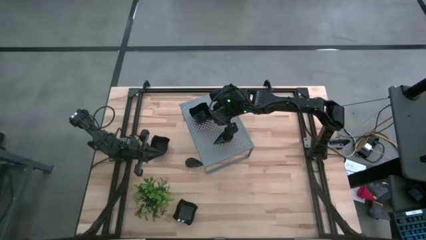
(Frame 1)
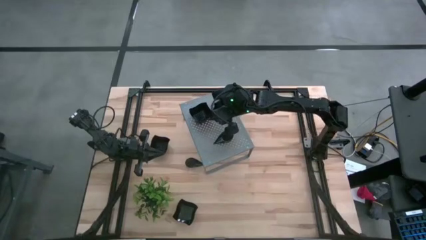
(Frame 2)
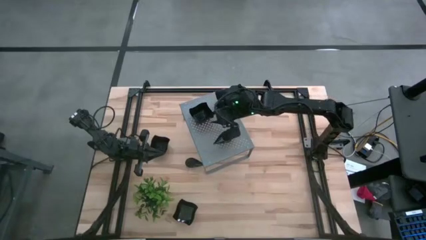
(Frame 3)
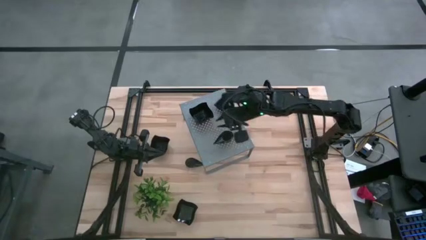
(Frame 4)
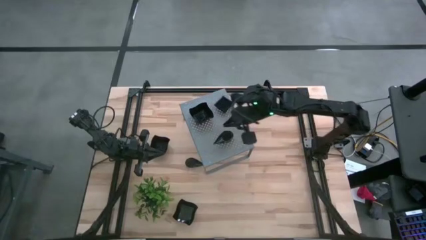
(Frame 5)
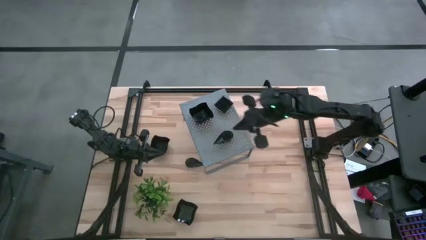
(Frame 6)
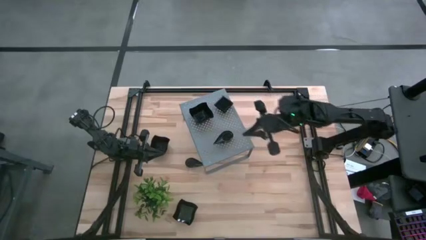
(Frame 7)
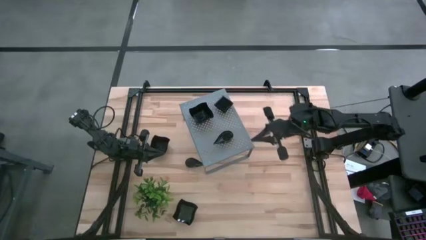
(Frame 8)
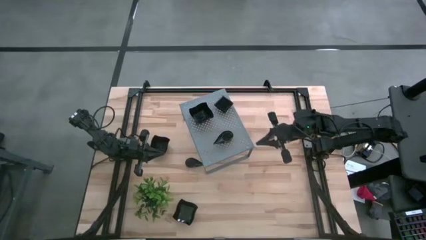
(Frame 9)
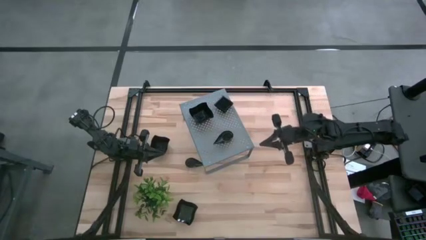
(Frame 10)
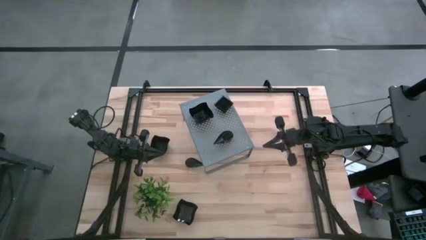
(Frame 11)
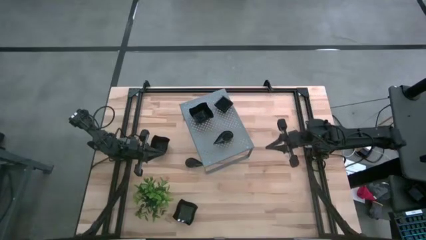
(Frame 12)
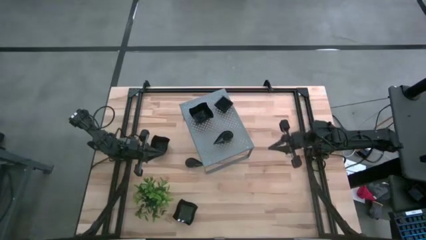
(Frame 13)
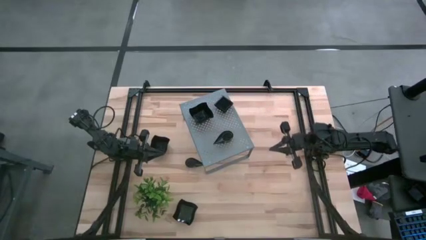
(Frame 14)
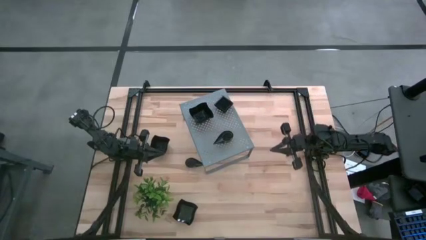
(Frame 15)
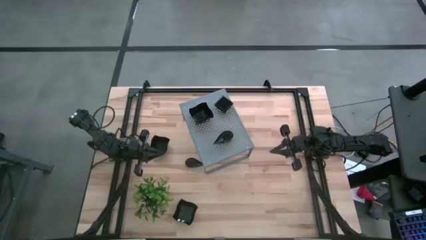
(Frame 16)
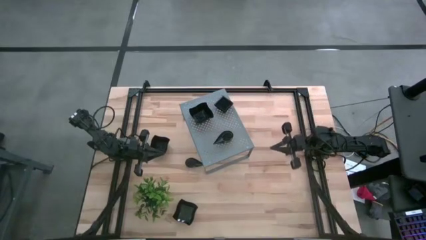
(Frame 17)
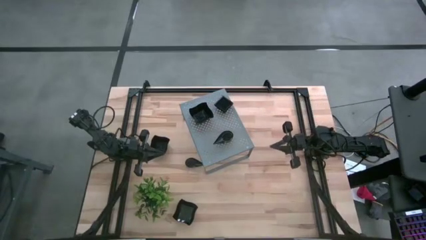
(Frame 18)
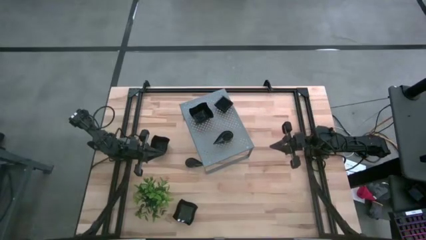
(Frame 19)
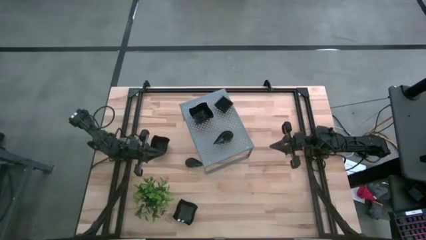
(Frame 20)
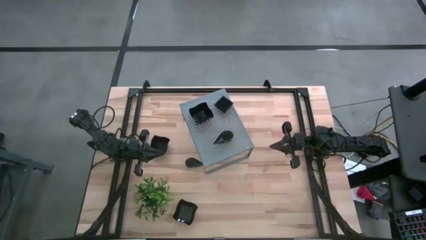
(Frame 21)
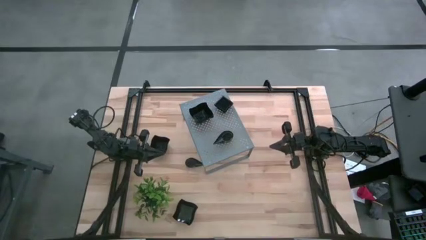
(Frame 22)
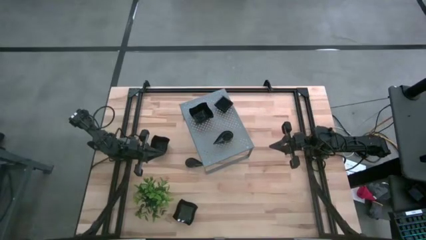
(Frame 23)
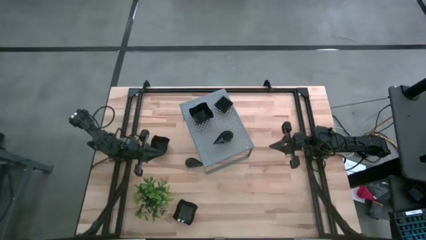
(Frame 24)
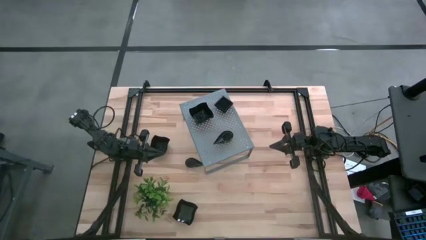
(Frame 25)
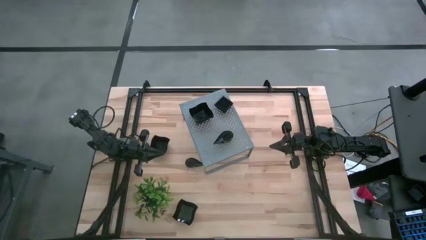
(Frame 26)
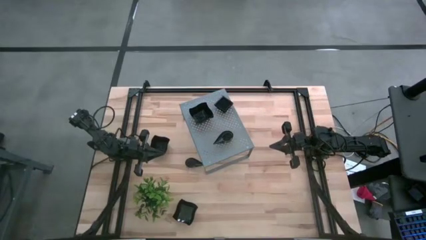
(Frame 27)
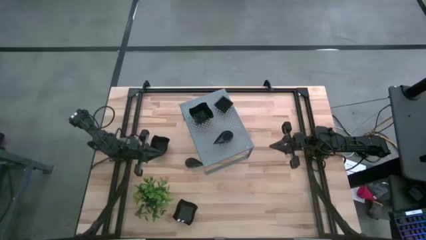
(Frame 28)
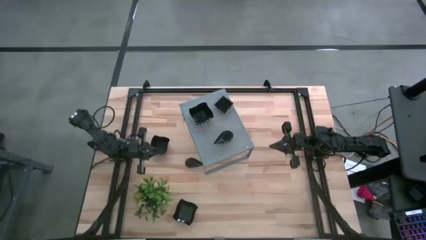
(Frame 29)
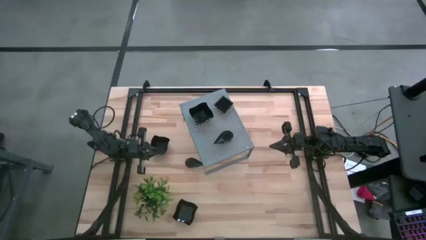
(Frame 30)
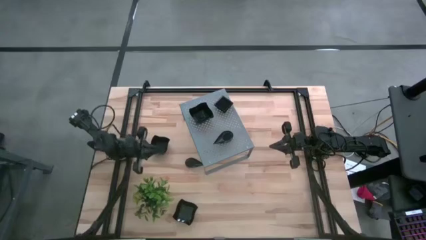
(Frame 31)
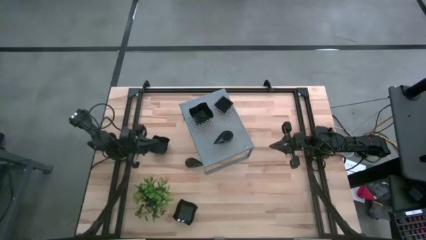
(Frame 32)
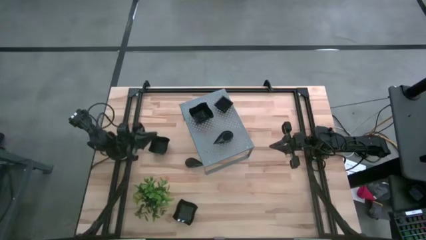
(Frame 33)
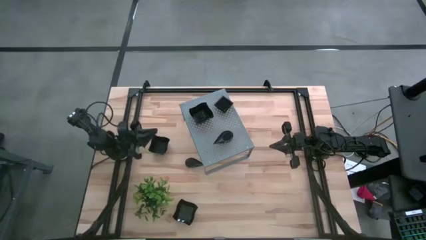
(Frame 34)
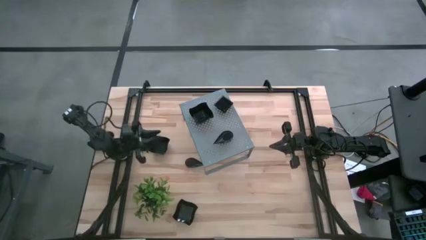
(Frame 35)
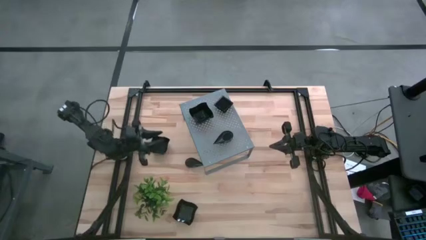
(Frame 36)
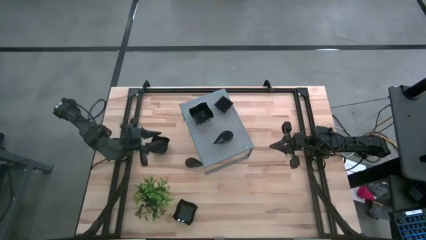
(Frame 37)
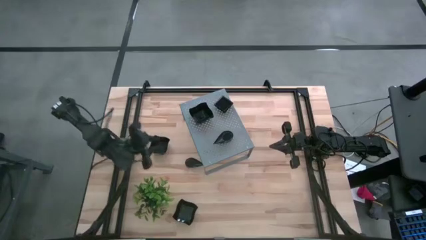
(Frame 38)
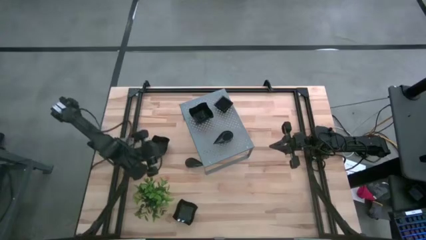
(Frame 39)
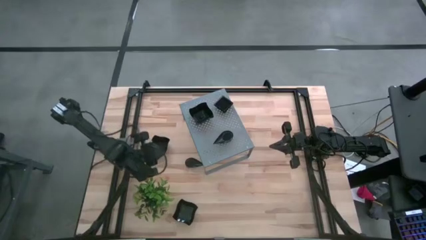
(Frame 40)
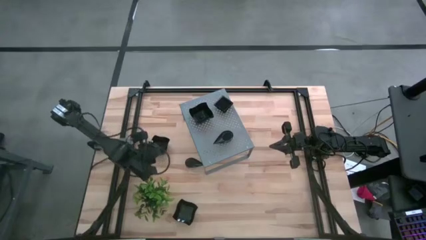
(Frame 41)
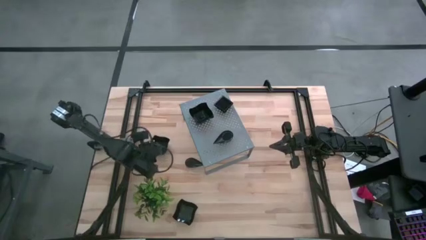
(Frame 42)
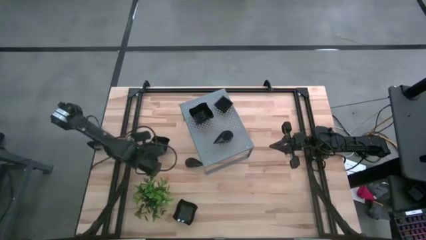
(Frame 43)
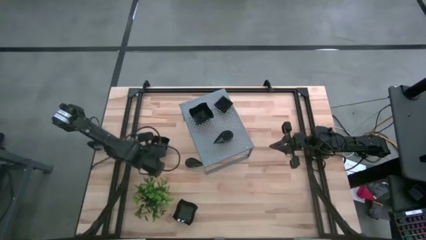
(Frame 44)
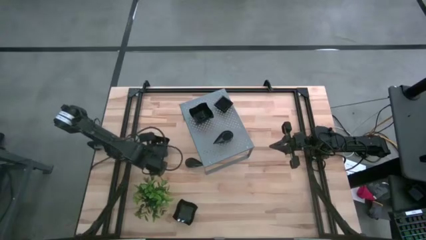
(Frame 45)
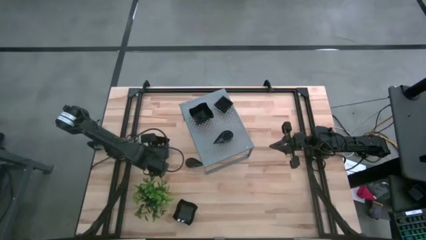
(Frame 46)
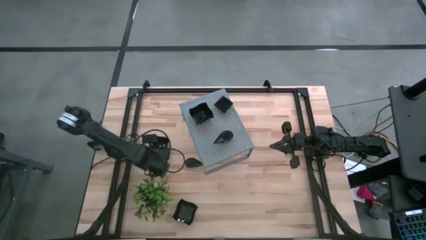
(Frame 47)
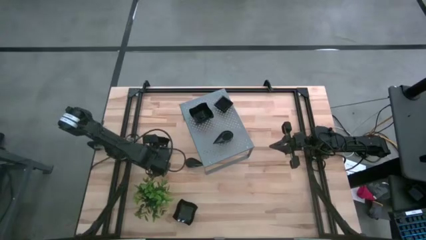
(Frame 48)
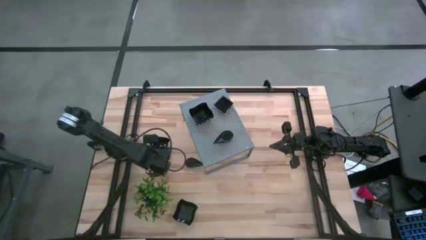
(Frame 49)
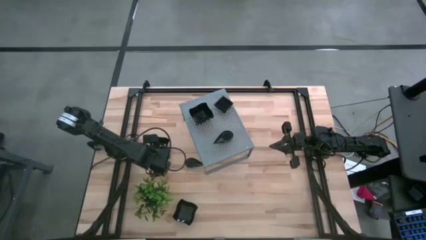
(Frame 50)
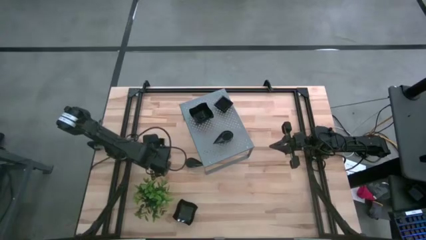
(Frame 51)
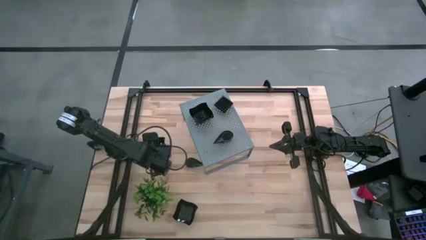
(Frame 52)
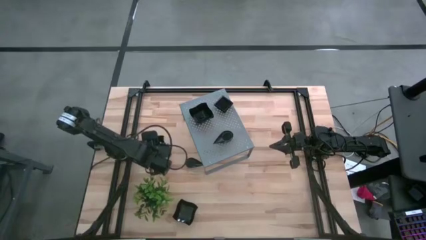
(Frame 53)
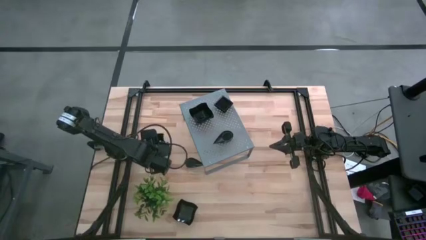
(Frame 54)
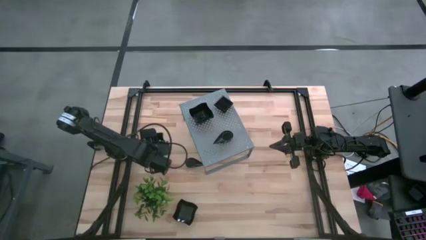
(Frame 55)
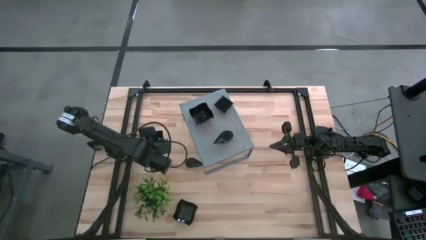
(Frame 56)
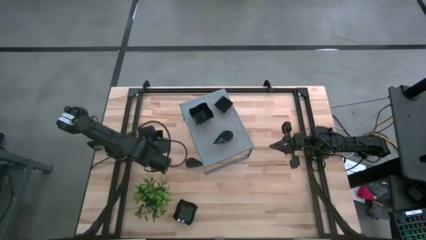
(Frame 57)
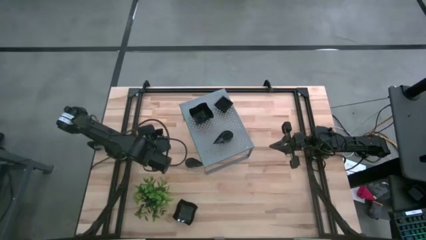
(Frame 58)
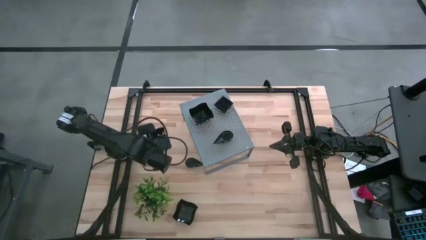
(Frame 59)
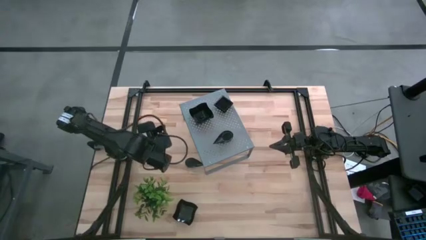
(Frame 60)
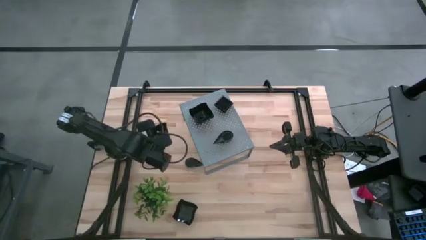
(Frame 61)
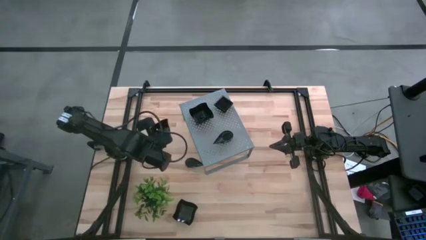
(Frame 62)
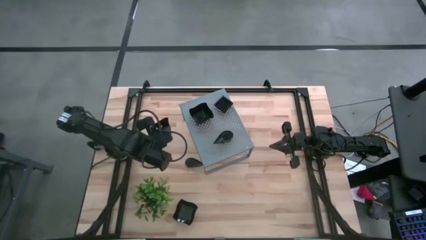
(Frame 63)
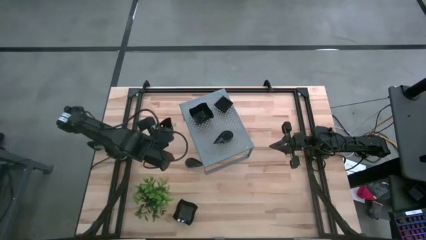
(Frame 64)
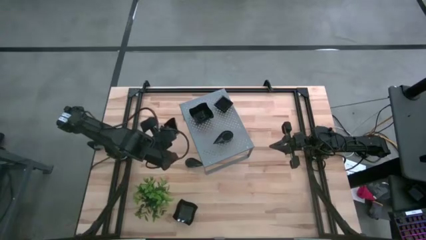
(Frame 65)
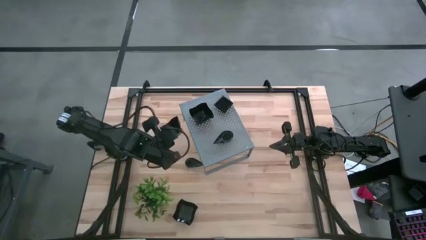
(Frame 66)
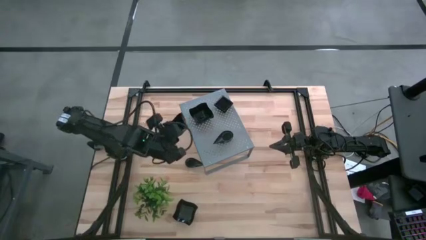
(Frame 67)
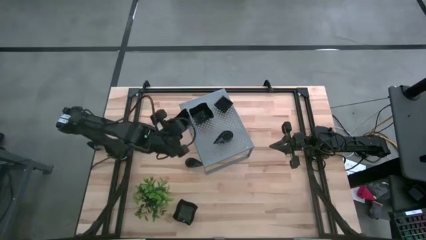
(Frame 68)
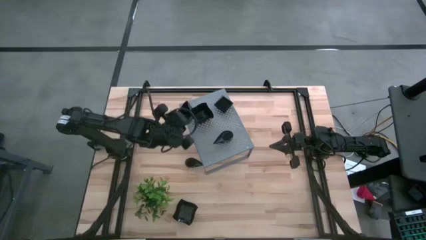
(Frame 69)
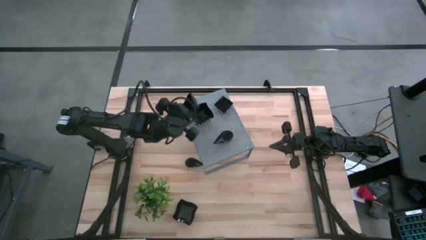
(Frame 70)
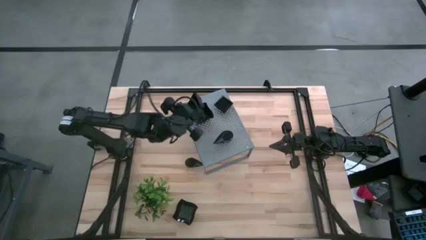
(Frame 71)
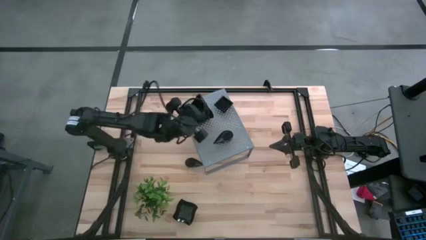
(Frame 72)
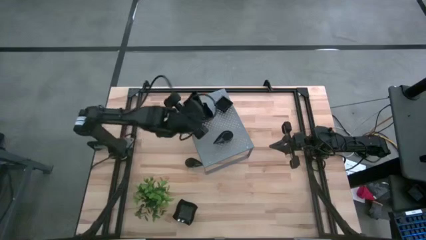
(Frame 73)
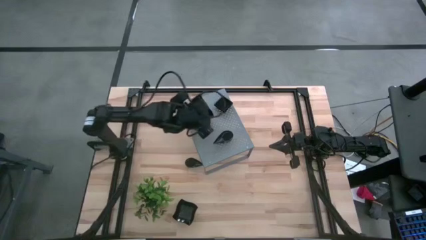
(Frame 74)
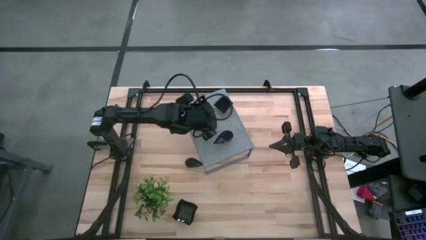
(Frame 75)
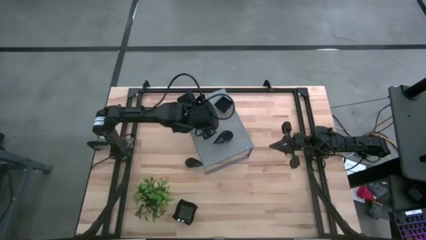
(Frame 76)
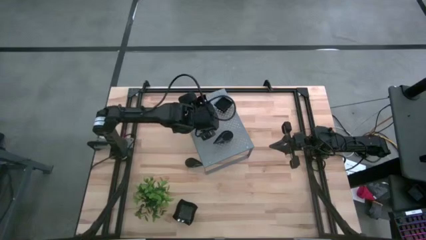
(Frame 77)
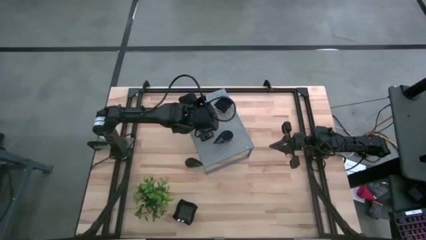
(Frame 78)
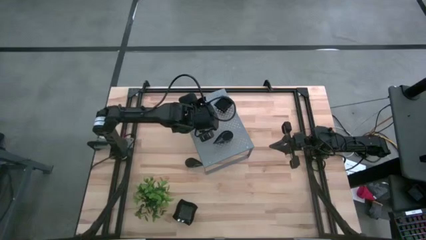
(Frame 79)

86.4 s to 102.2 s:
Task: Pick & Place Mini shaped plates
Stack the distorted square plate on top of the distorted square plate on the shelf
